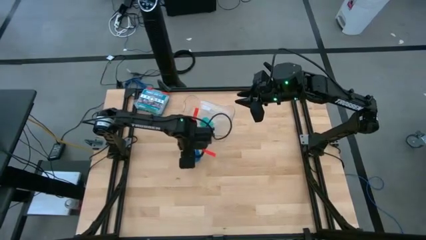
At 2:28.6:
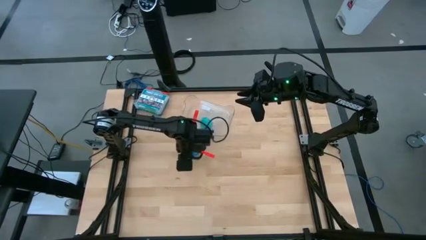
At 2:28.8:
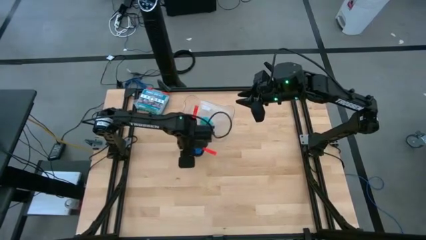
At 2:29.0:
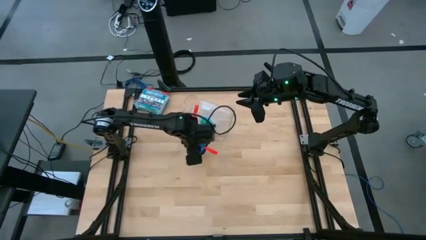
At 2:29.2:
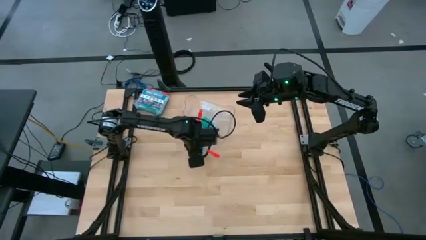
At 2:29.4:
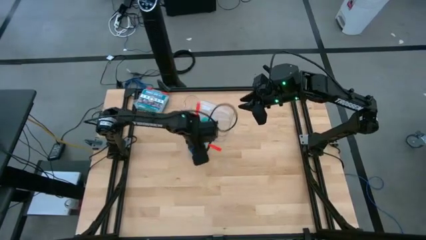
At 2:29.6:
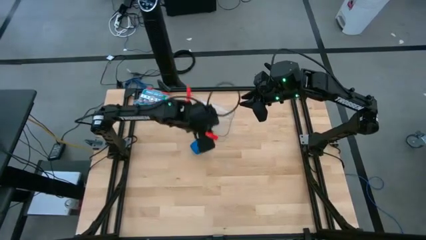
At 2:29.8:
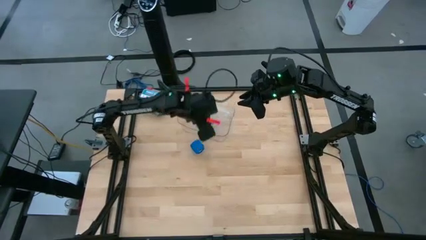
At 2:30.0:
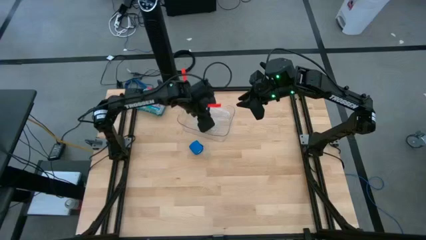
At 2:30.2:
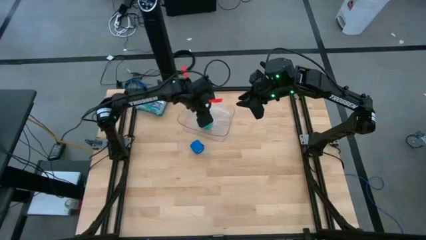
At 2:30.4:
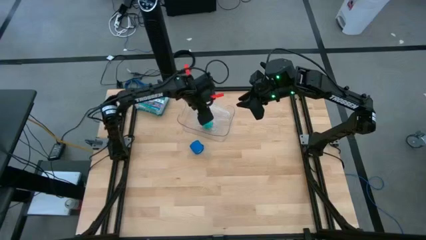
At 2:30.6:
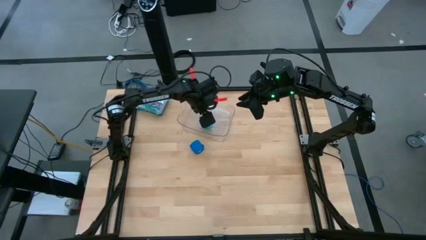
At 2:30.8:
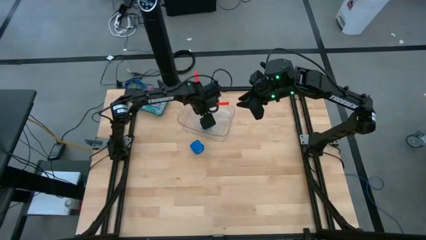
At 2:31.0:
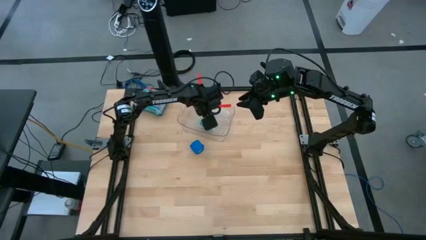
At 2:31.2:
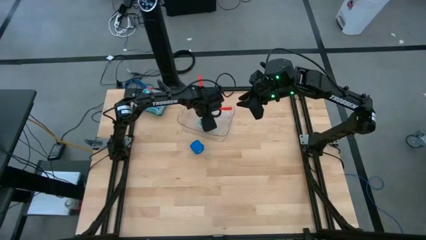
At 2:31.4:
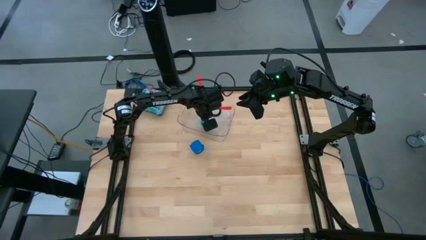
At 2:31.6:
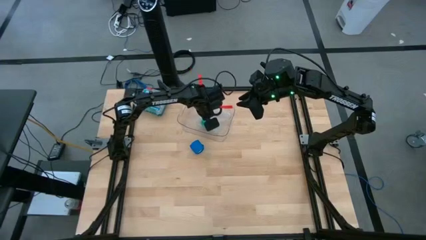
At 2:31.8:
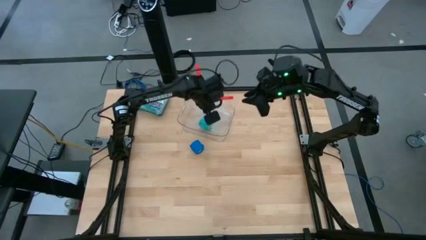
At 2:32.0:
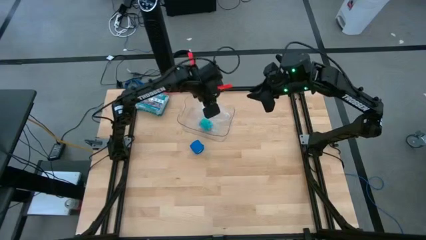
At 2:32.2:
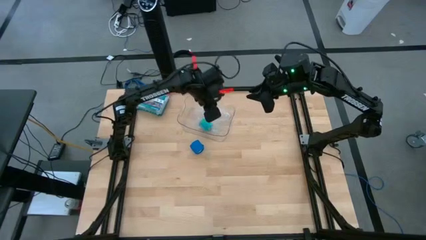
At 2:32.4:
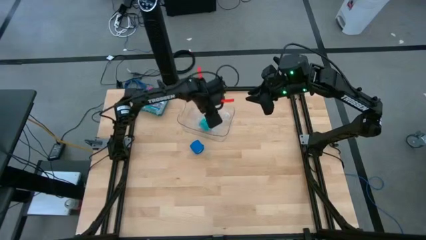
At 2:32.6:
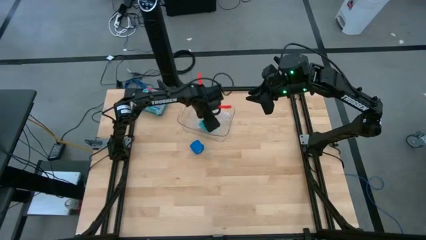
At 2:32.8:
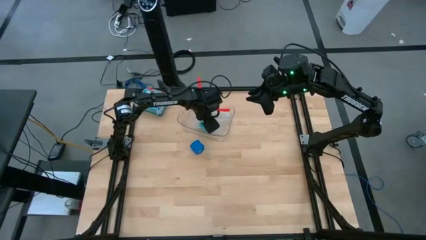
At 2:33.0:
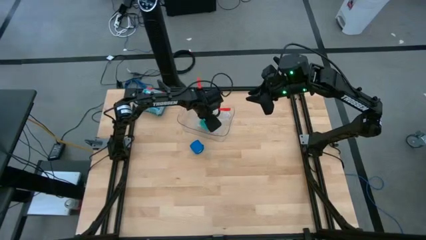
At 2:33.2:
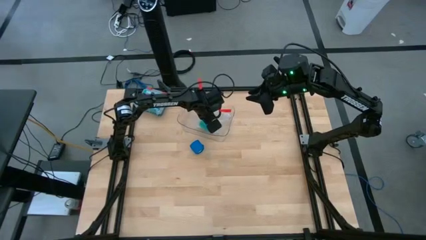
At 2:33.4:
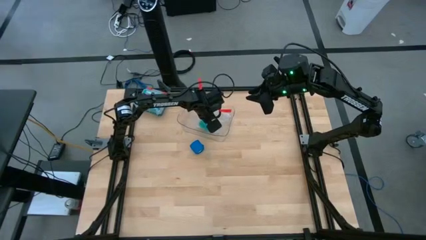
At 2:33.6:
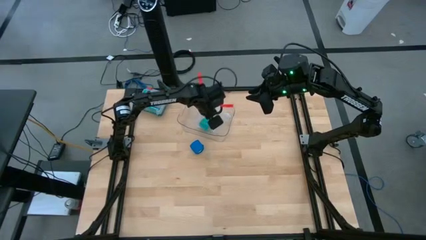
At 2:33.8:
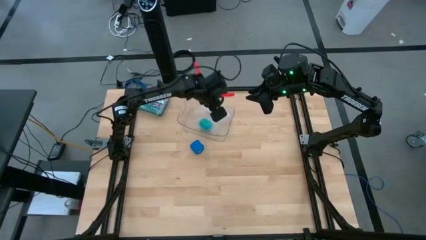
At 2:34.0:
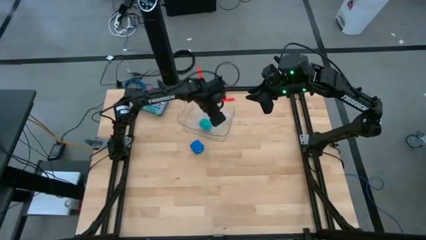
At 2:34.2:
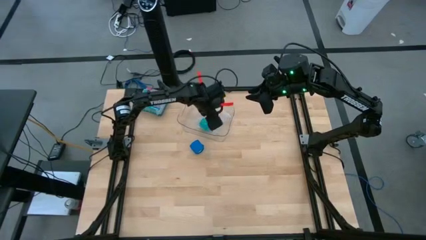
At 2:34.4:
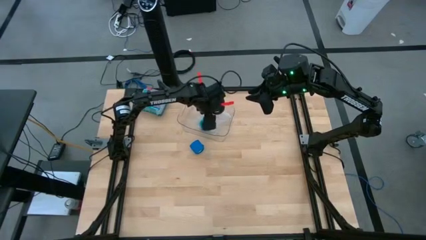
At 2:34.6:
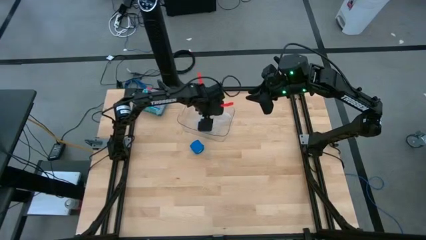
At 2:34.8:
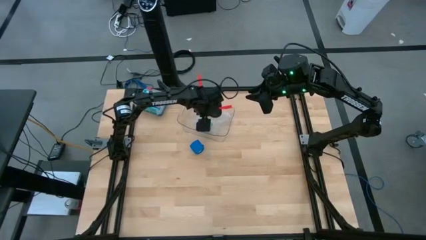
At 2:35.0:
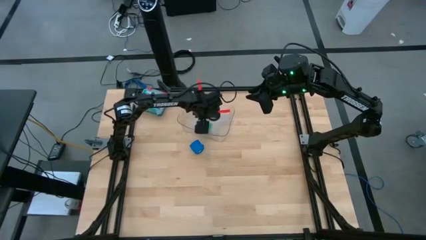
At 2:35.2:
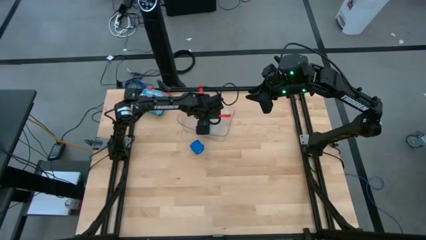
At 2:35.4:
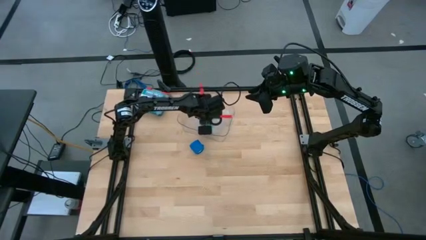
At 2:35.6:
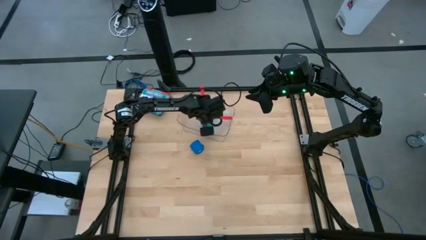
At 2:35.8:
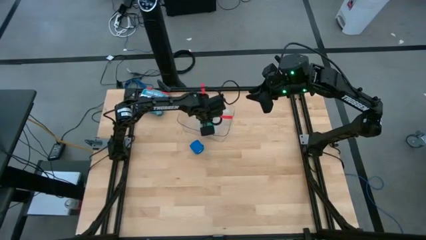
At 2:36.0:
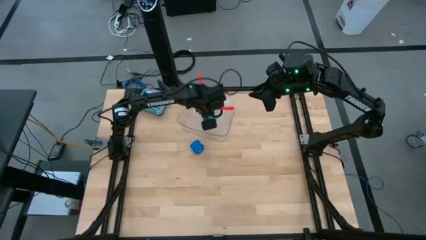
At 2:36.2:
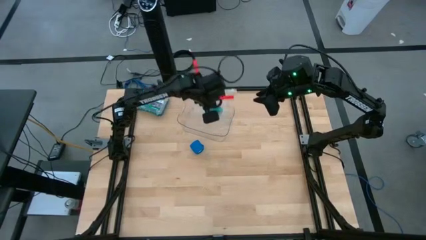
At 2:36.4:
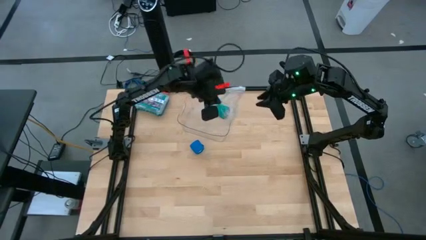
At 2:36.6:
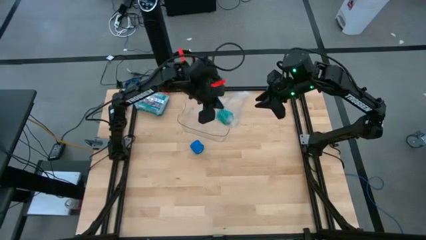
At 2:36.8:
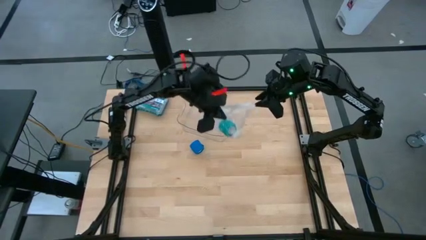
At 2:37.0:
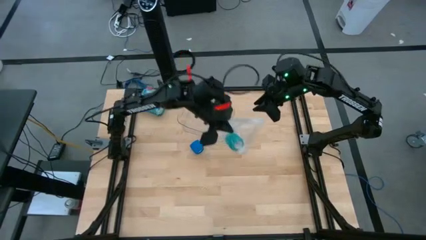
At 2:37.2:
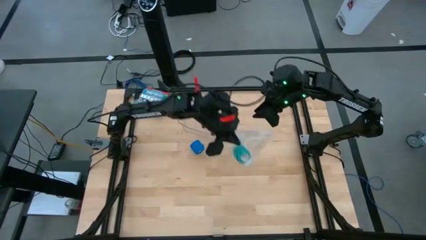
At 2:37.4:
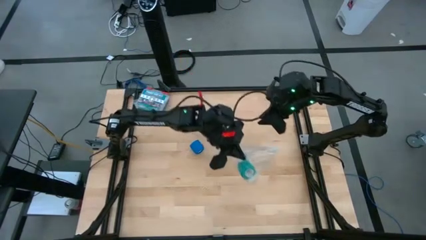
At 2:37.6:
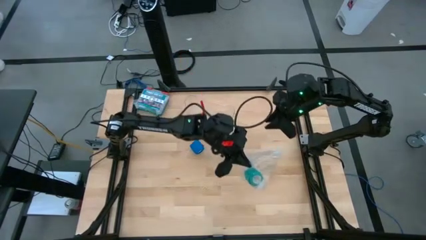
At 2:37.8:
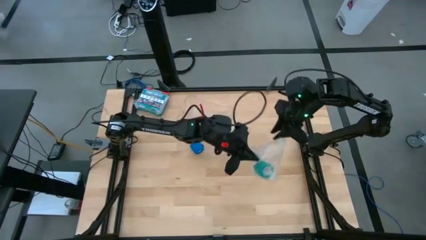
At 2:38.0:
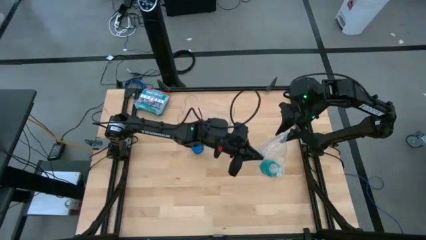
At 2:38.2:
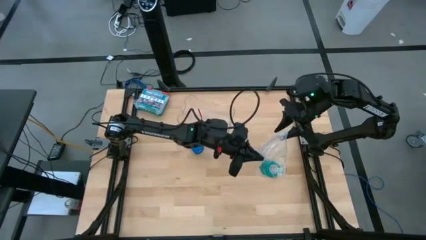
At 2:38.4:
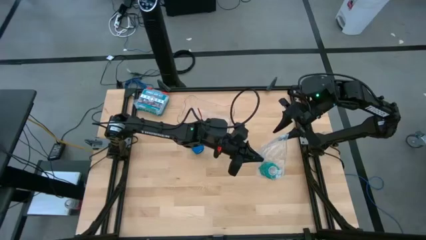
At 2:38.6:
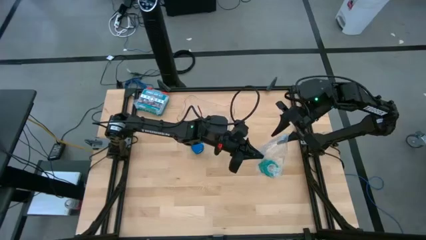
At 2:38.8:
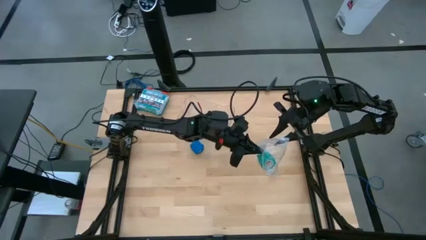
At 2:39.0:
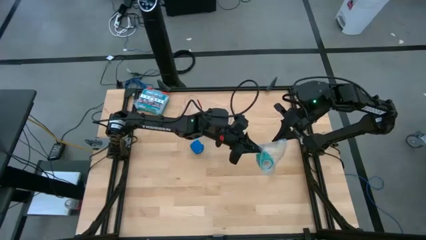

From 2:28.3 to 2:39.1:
Task: Roll bandage
Open the transparent zip bag

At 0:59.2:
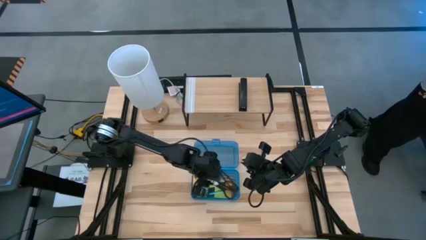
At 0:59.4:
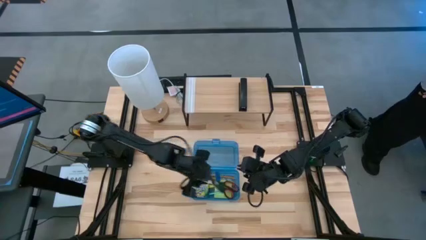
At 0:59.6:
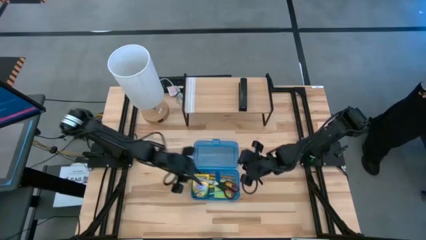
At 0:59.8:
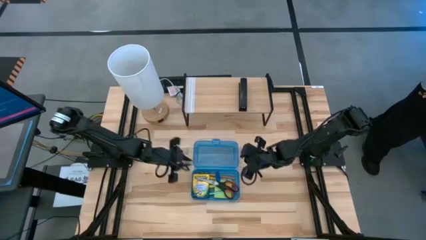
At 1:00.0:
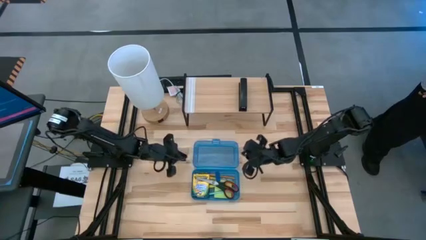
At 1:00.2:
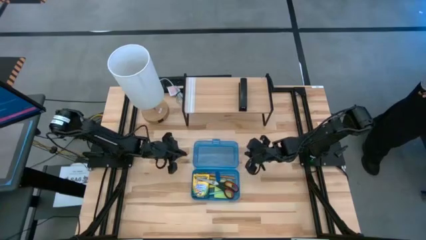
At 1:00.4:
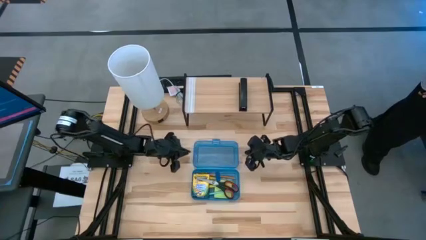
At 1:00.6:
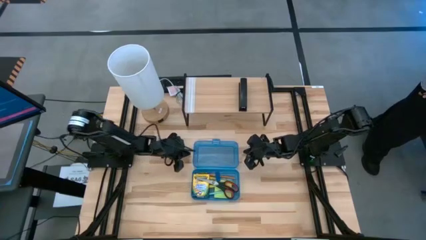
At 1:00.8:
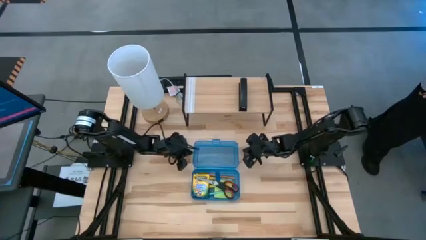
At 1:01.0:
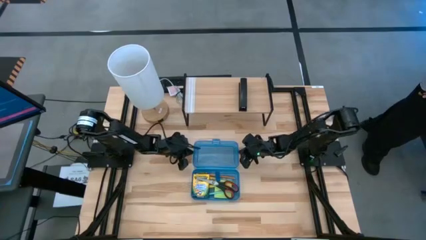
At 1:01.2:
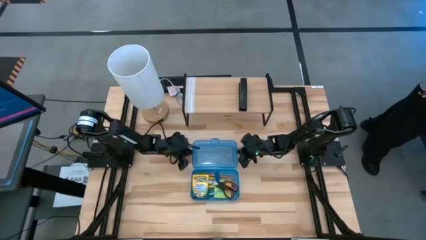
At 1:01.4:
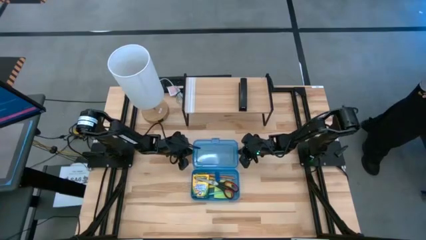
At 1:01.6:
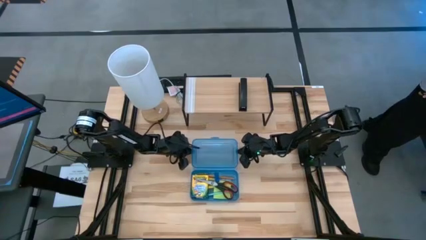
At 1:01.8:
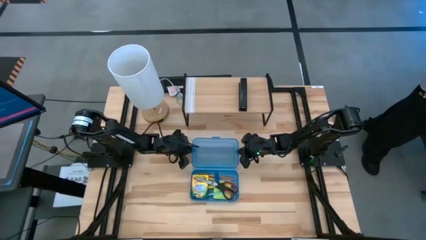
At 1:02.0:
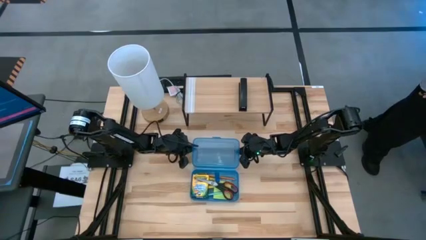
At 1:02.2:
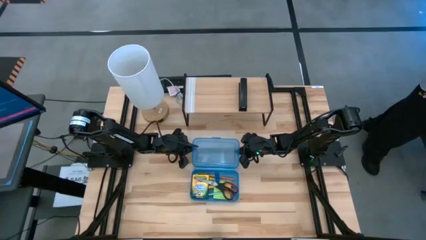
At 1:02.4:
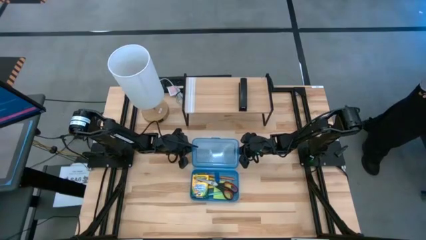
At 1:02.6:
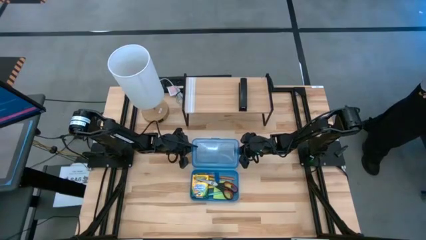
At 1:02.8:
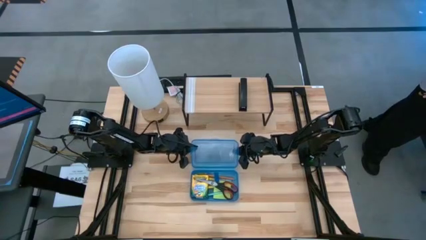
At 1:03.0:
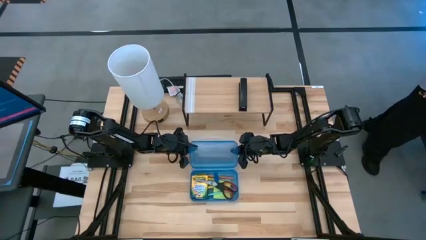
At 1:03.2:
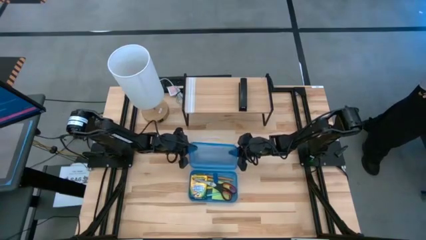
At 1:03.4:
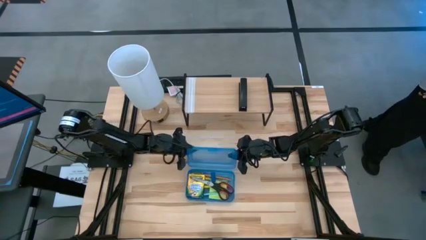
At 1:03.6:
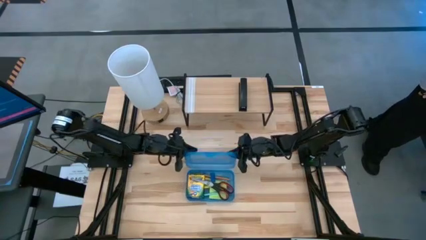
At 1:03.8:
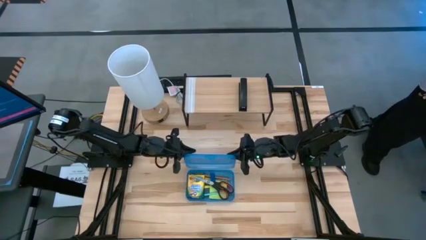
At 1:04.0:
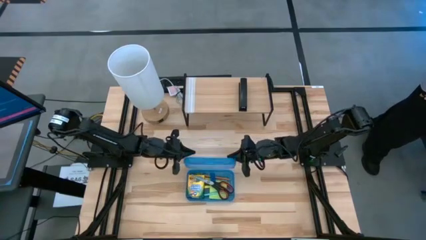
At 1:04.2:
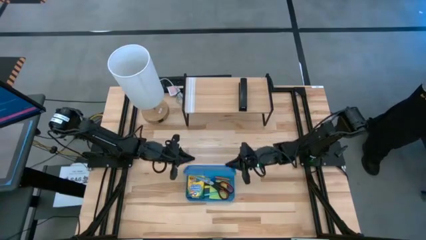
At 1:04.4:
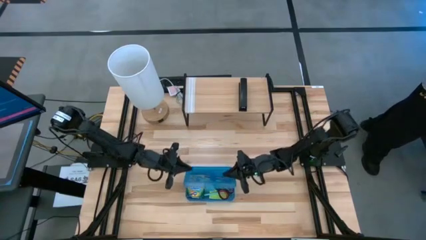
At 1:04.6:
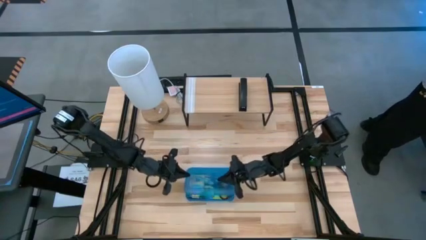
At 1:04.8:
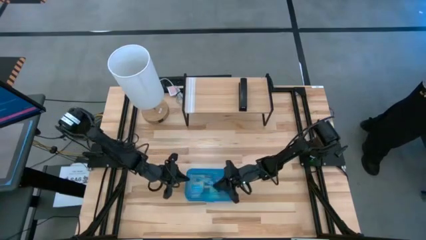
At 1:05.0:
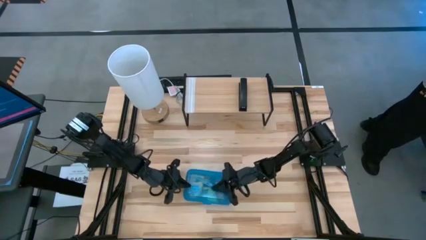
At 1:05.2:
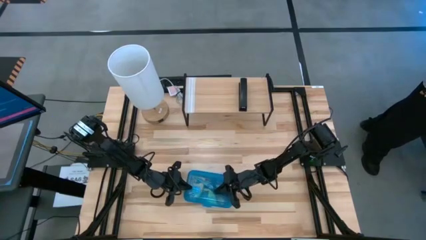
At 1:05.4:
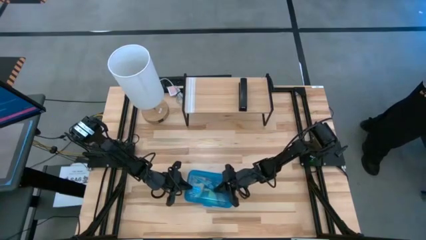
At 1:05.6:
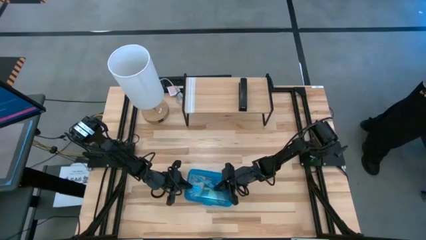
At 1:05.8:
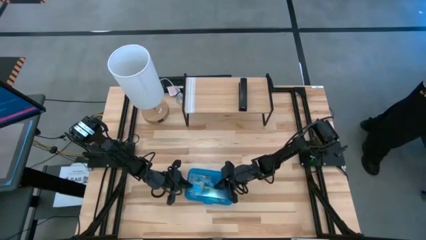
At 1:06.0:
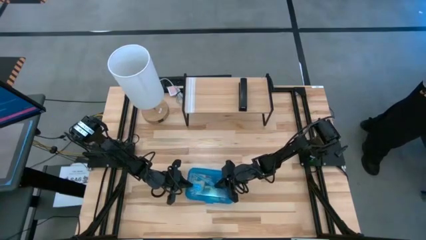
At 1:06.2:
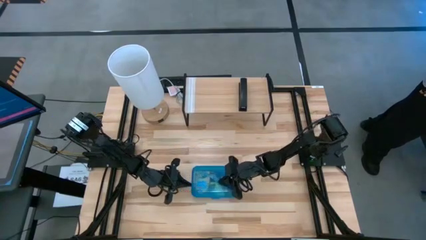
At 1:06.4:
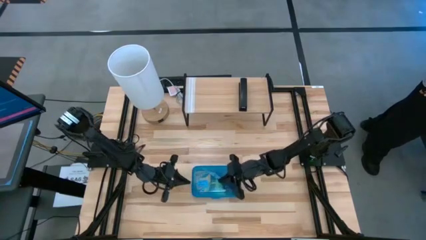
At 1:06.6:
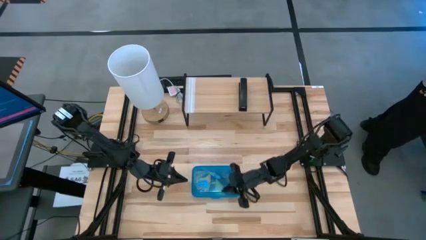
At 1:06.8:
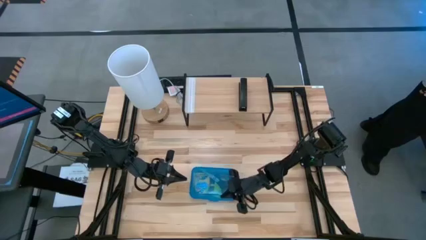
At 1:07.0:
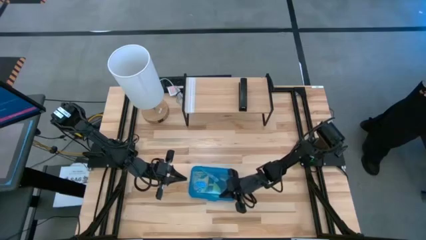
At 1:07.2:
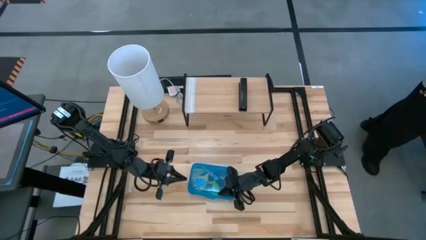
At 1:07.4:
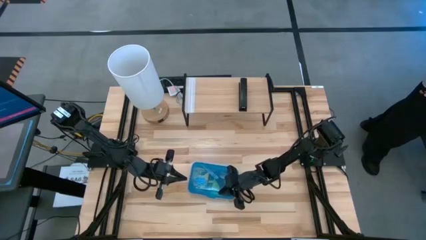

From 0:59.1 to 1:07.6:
Task: Pack school essentials
Close the blue supply box
